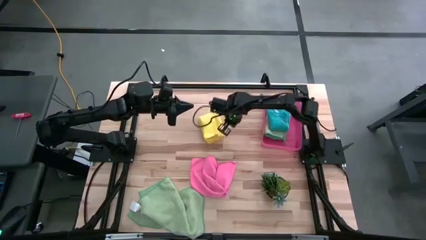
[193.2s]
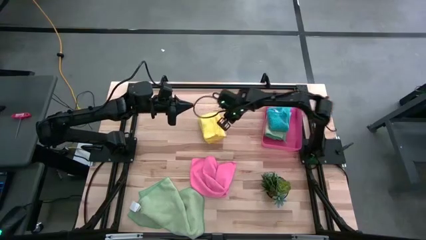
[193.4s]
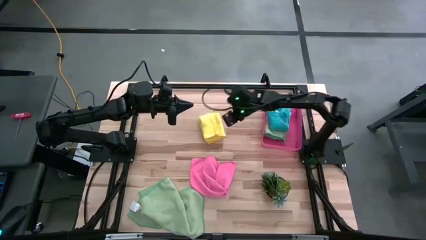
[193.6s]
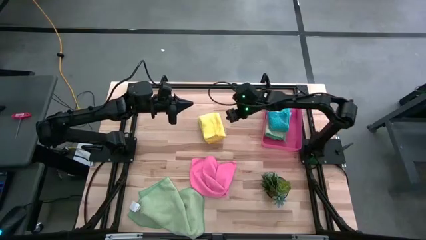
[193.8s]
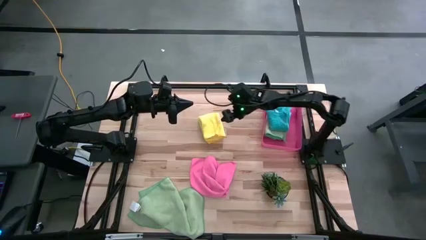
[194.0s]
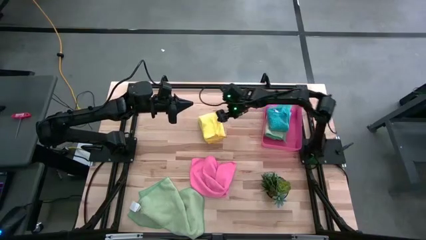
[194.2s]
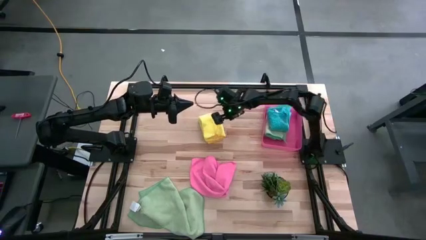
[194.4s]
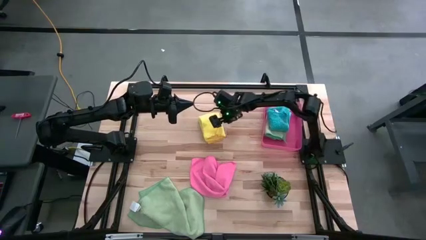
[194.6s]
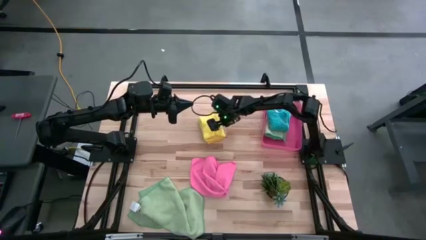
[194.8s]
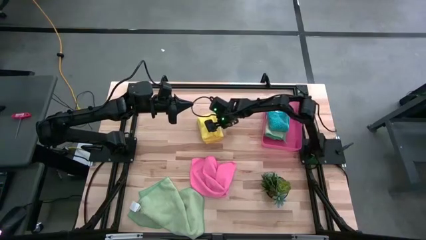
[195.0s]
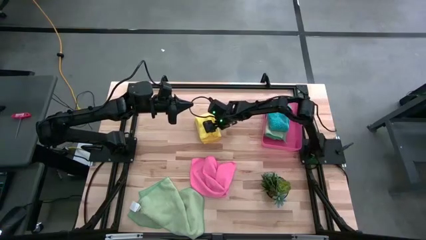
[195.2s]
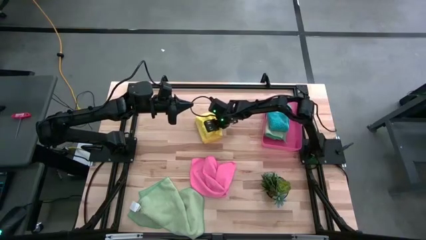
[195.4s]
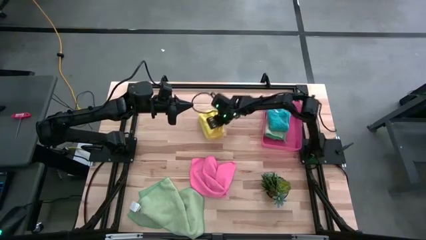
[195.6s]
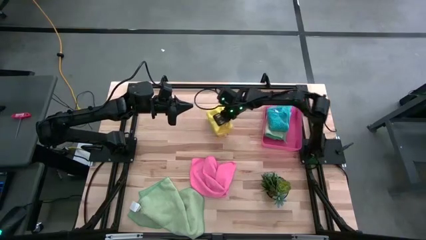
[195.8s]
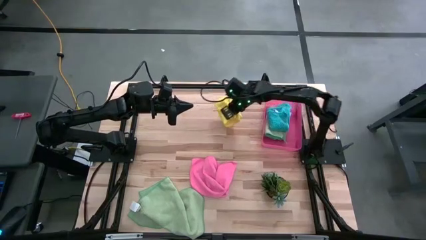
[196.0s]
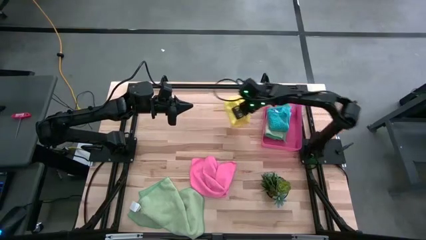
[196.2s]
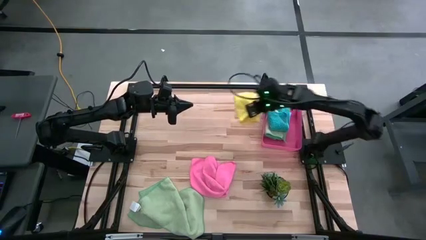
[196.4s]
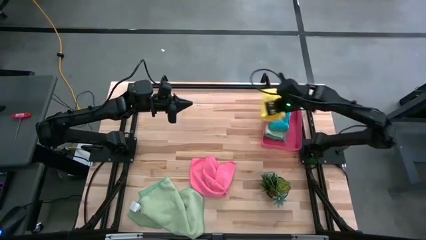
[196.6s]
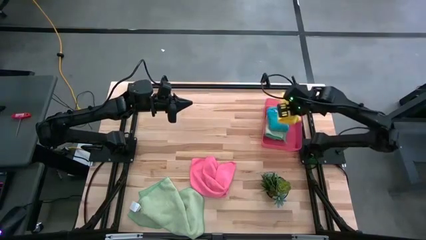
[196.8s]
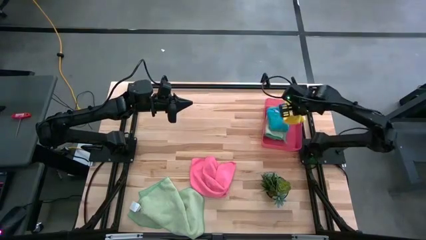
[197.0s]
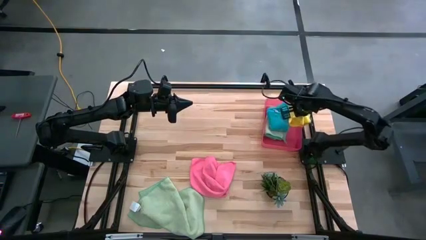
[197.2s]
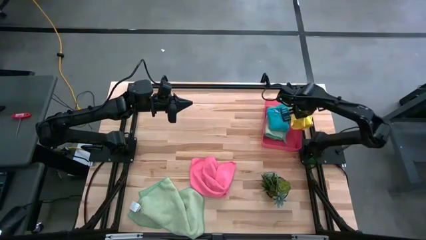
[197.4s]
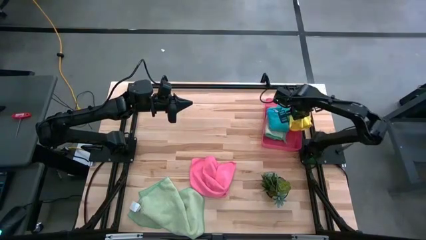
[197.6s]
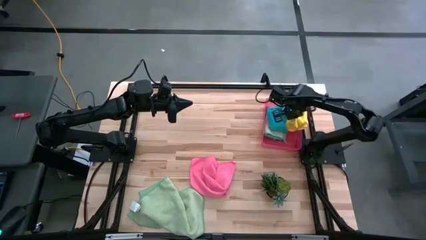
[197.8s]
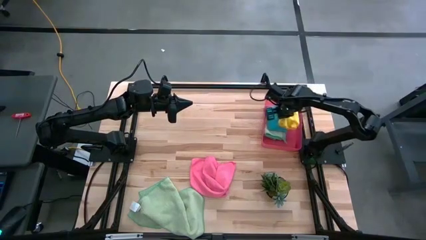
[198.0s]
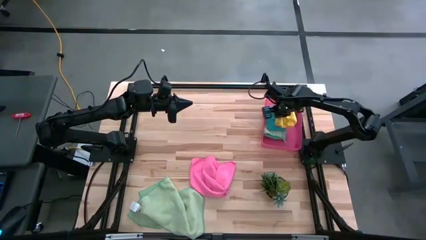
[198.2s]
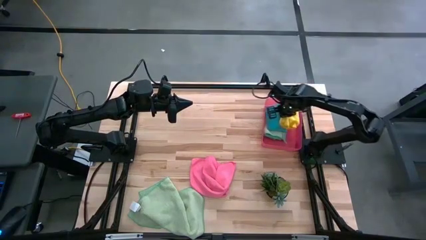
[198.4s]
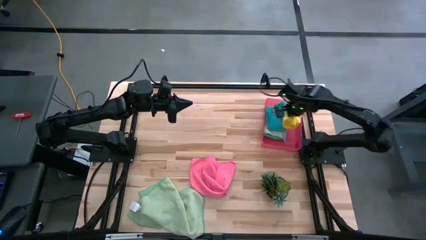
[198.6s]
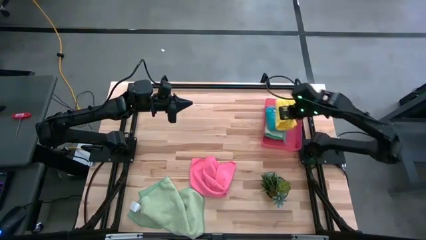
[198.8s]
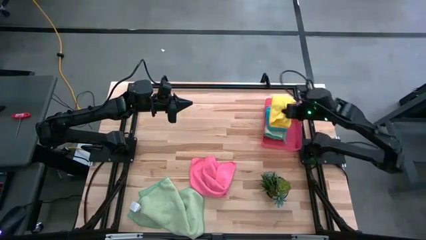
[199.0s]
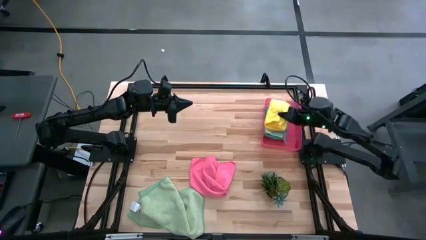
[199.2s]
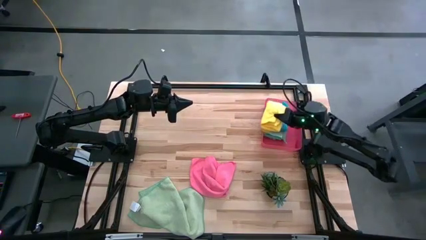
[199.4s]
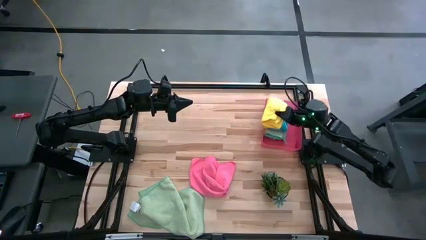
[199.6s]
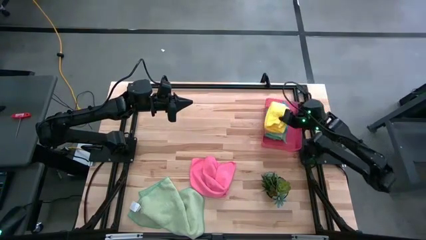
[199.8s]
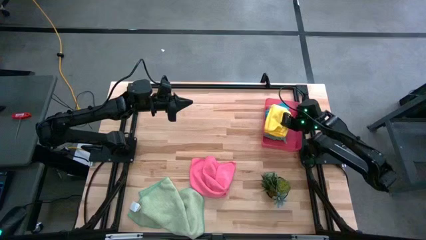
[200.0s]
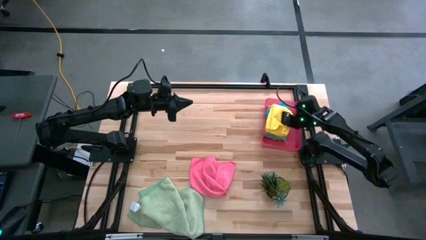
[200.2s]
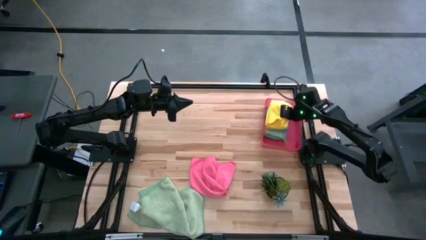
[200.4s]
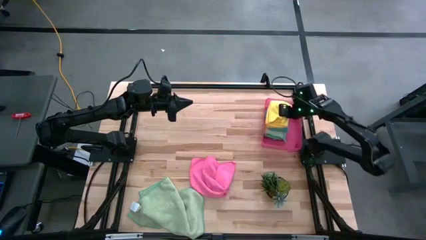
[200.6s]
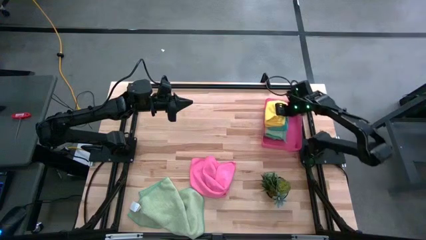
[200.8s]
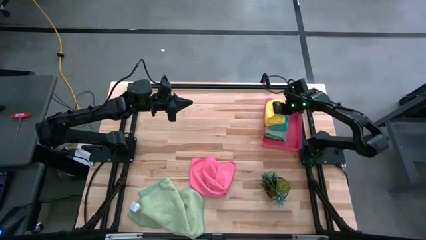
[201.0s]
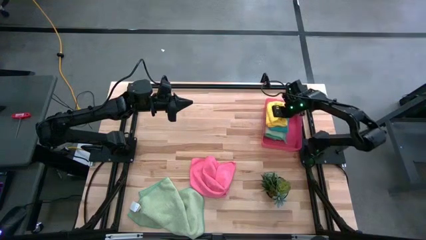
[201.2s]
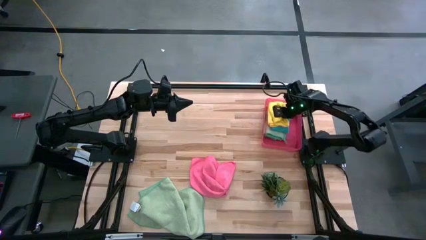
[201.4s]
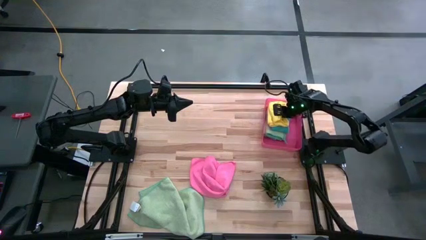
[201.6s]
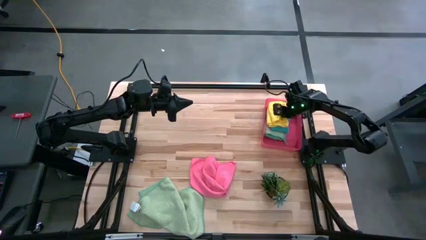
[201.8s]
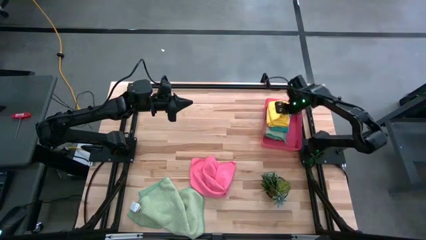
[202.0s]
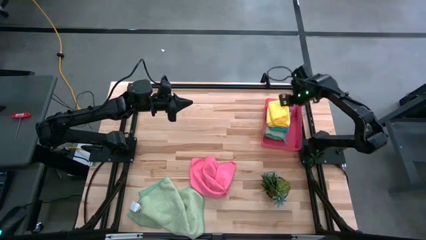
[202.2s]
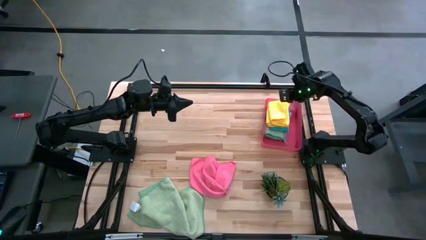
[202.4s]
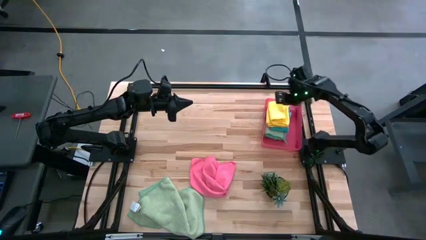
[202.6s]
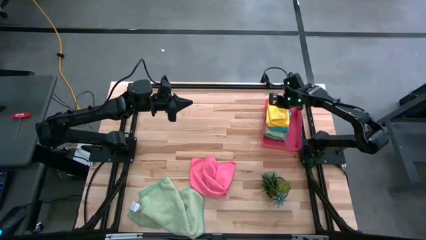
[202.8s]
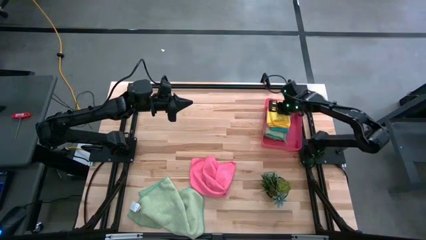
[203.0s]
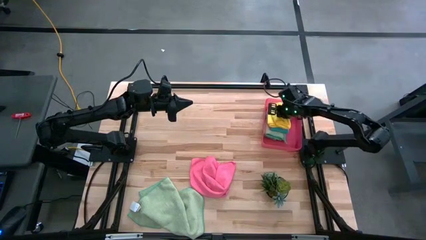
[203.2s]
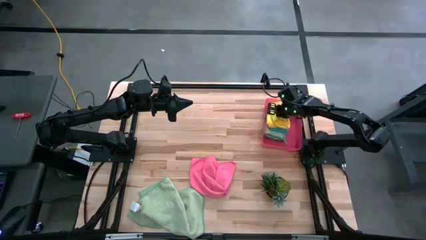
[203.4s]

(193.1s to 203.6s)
Task: Fold microfiber towels
Put the folded yellow microfiber cloth into the red bin

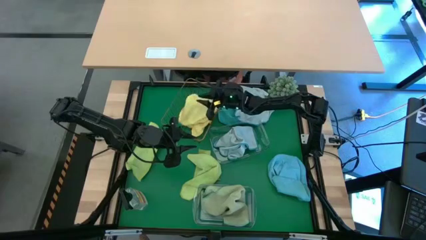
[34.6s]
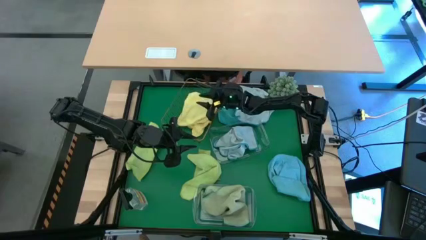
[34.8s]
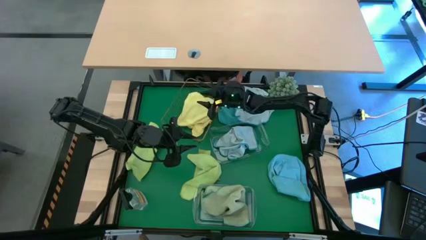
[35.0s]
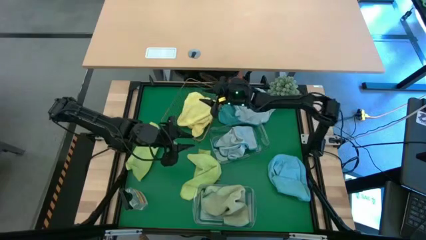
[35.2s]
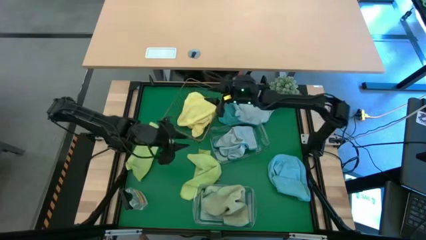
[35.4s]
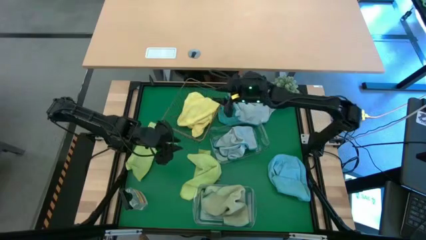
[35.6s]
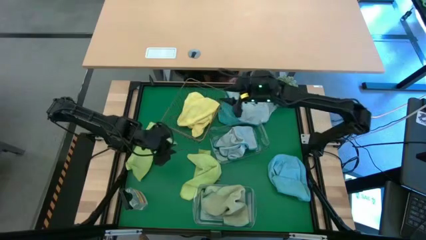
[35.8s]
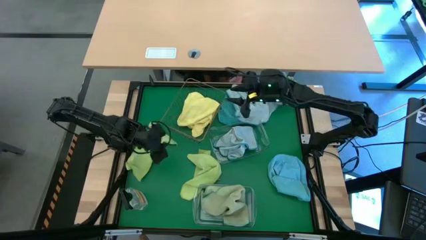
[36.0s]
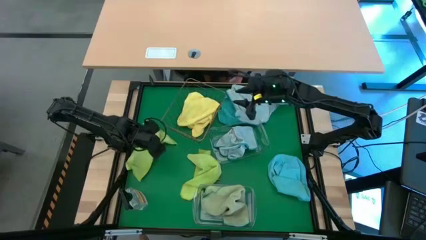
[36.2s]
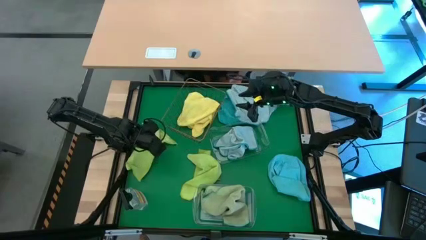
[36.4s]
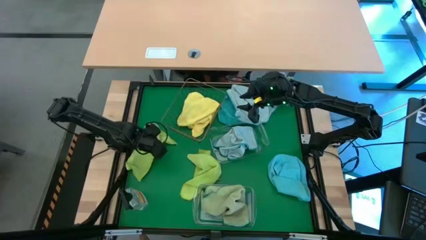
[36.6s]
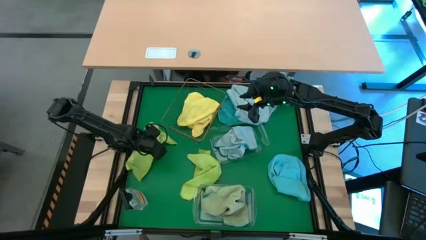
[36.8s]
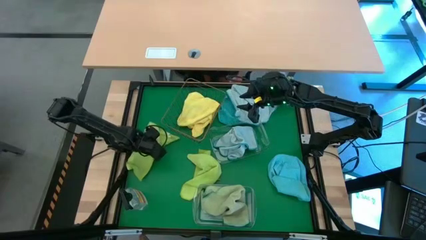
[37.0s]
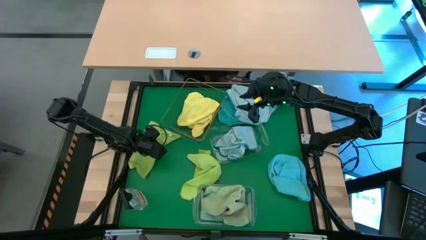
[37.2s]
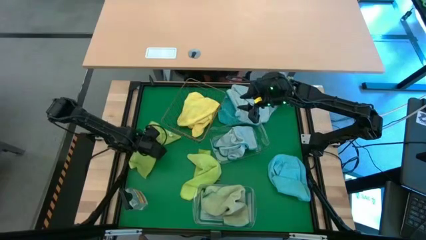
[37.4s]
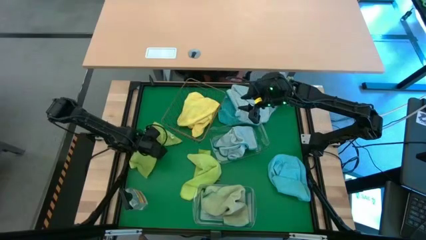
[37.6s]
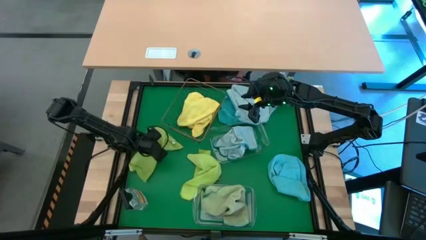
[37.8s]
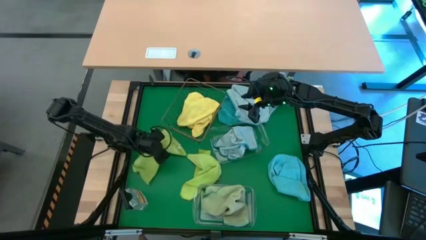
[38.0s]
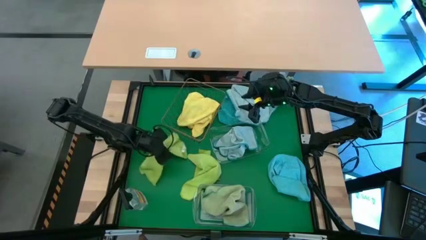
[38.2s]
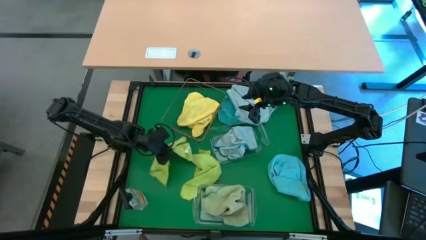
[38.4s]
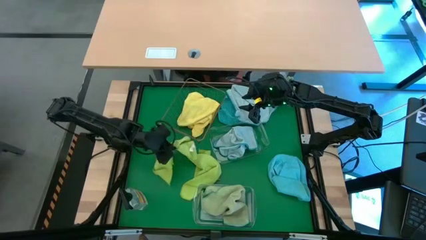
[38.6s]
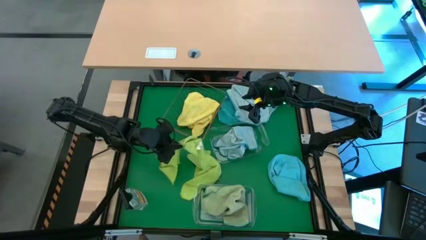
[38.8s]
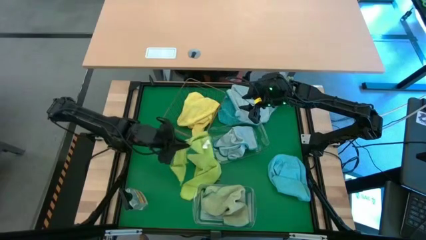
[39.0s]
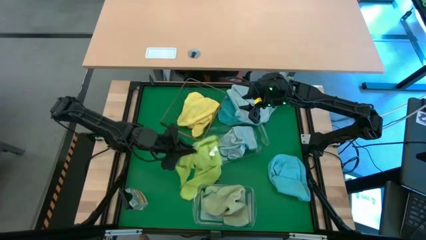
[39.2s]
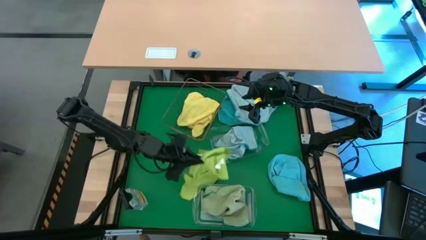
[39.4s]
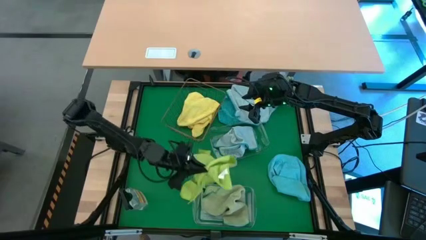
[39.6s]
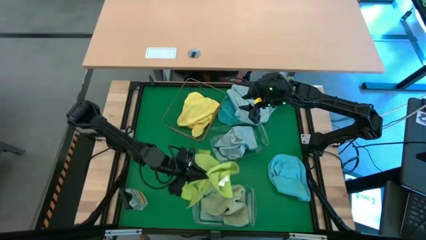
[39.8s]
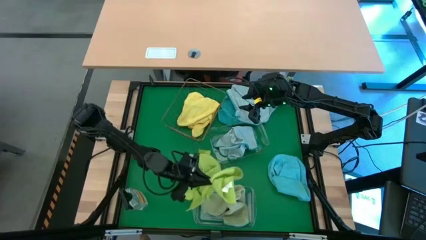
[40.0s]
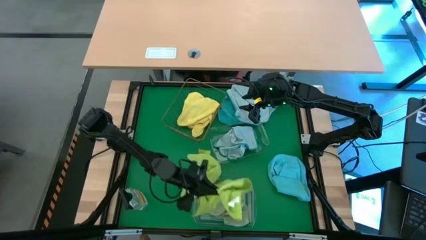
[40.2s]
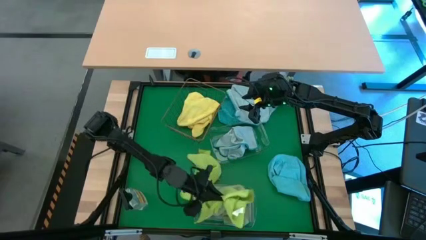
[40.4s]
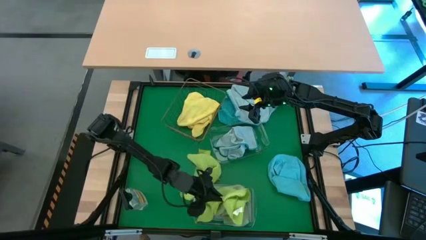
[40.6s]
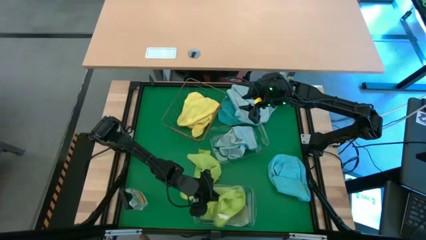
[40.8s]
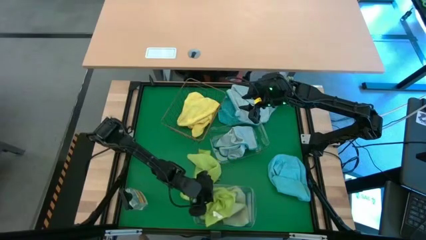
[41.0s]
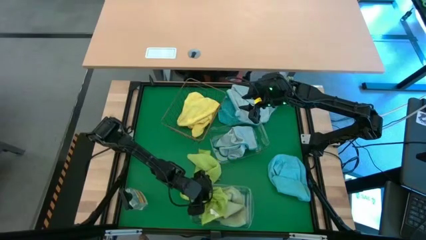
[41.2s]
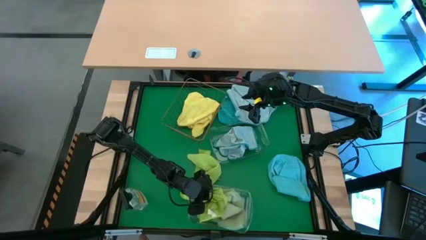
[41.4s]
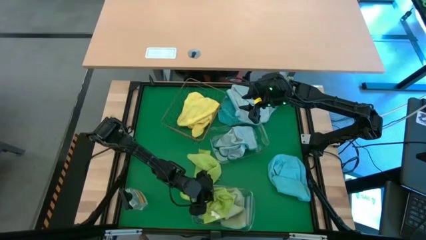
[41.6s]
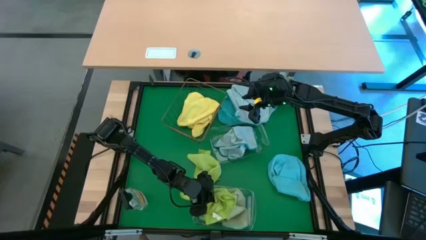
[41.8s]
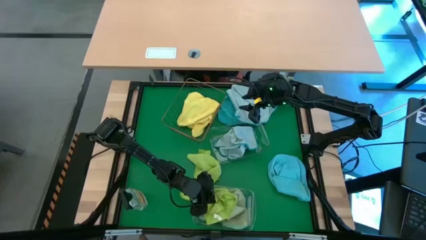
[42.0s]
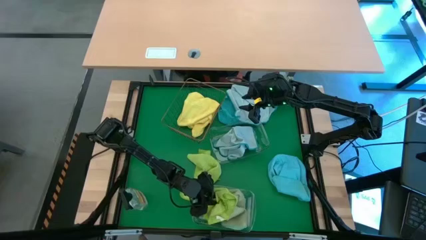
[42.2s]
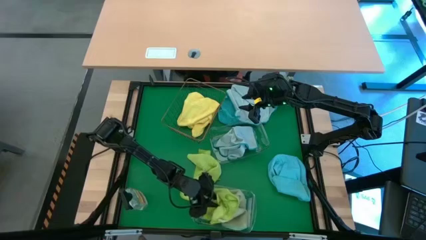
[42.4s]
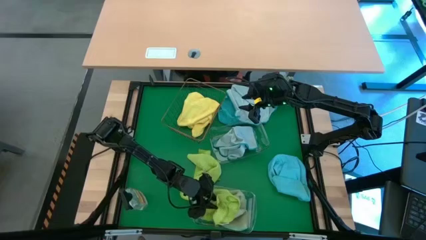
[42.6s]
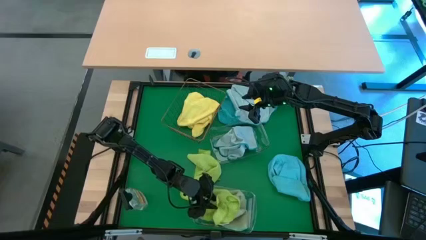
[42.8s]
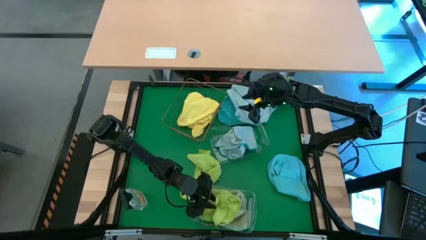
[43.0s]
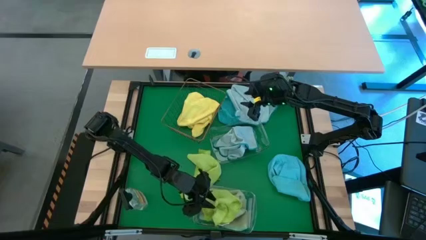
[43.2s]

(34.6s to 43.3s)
Task: Sort microfiber towel by color & place in baskets
Put the left light green into the bottom transparent bin
